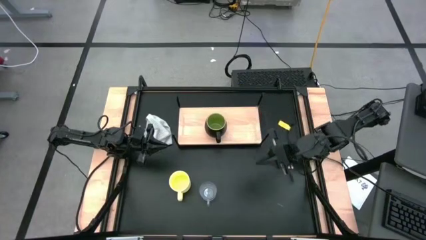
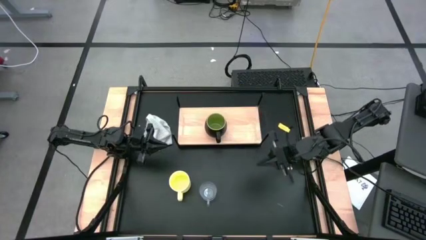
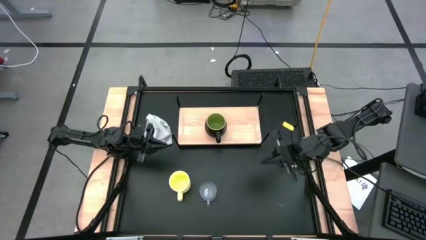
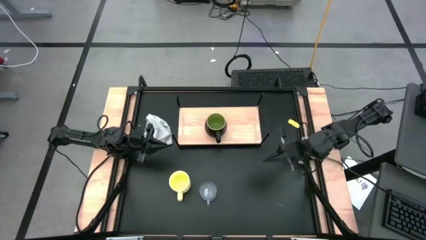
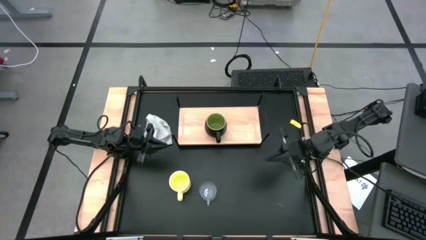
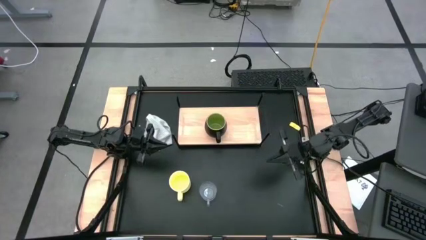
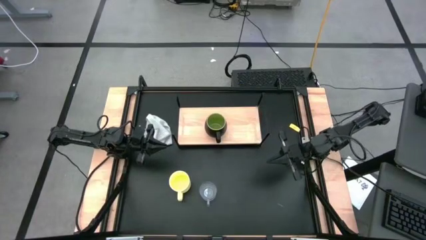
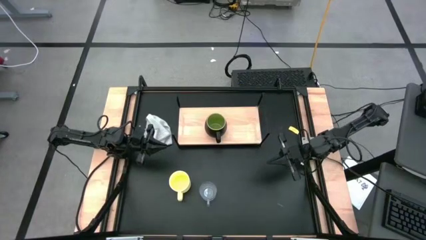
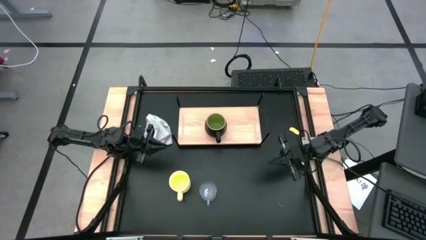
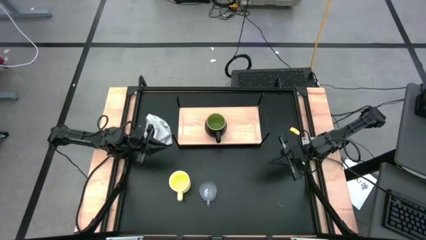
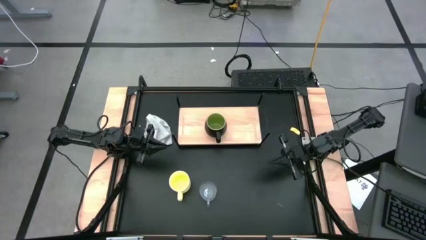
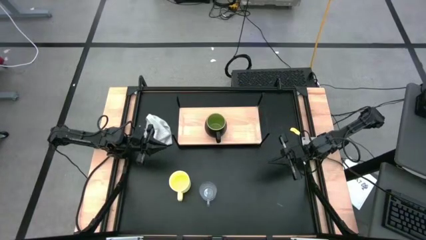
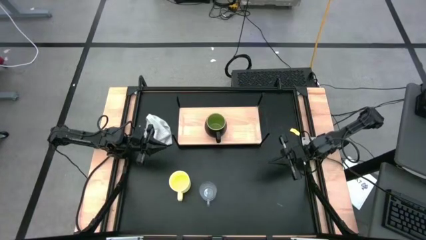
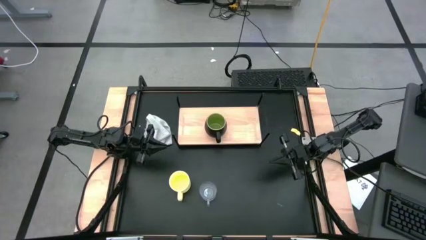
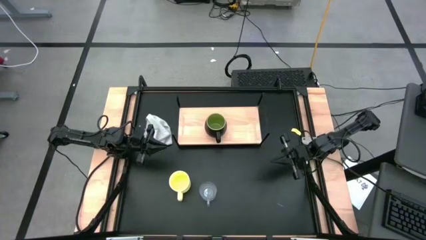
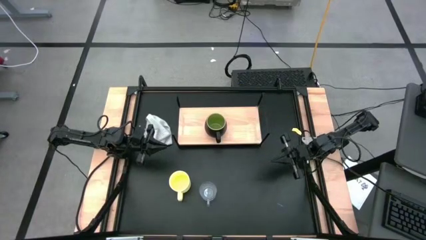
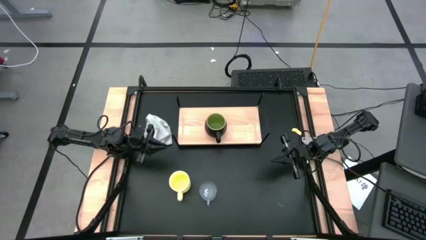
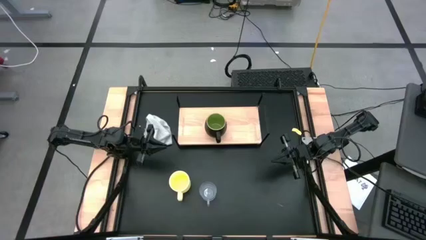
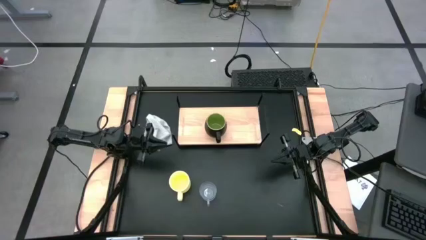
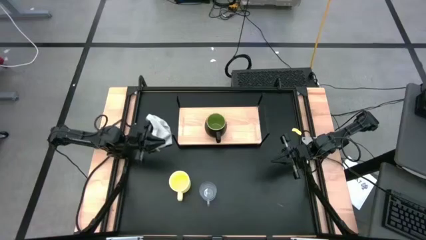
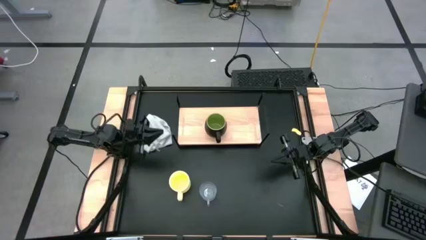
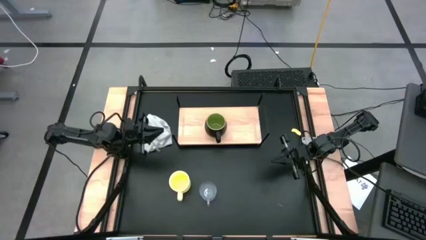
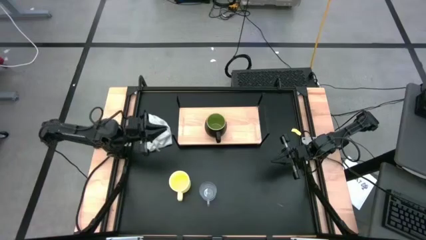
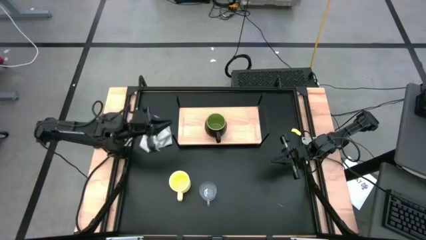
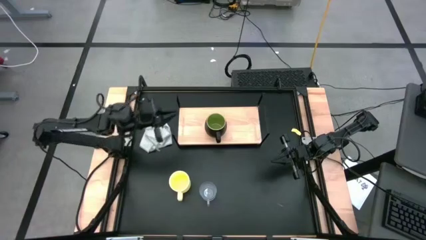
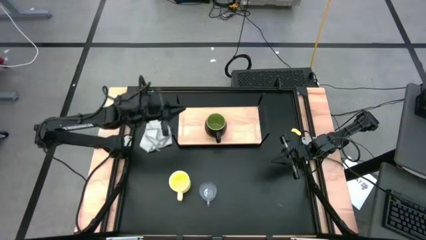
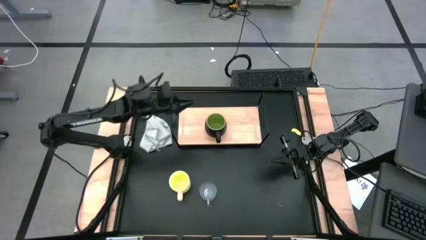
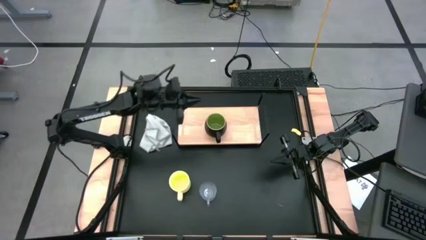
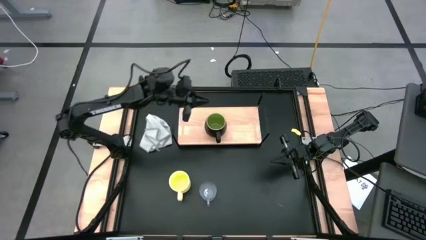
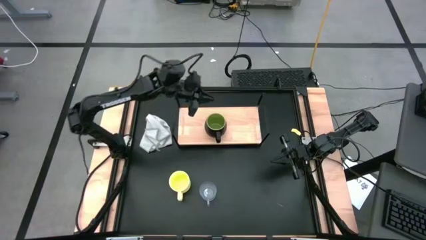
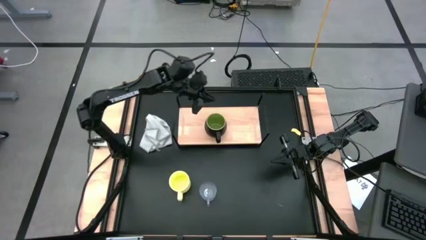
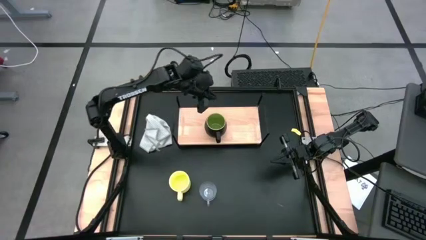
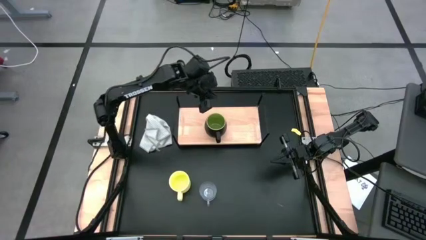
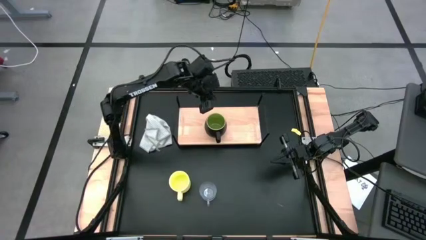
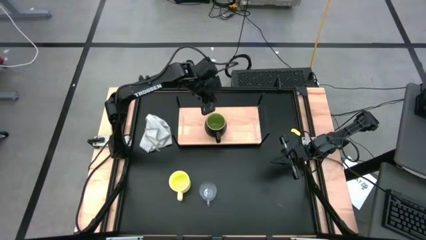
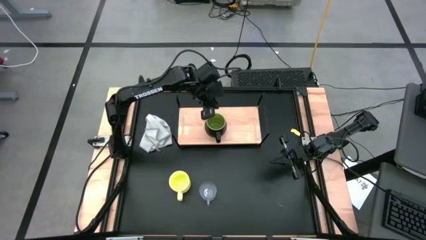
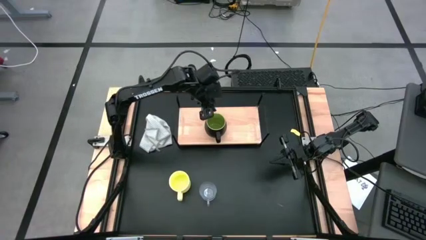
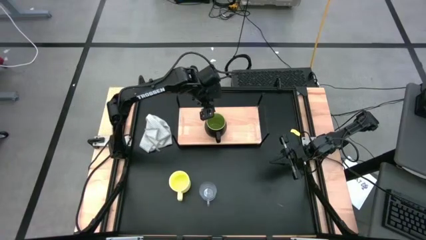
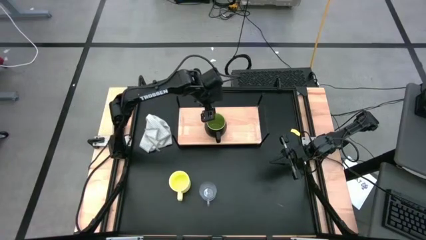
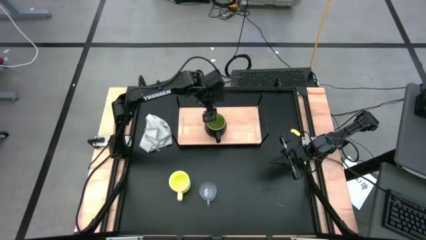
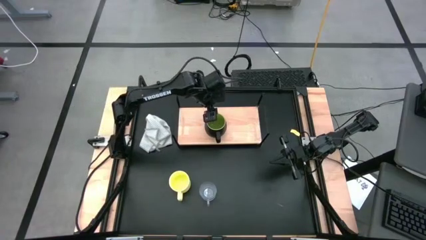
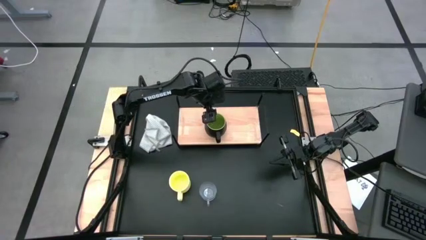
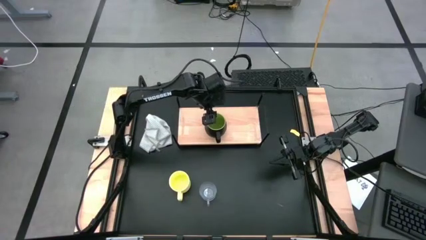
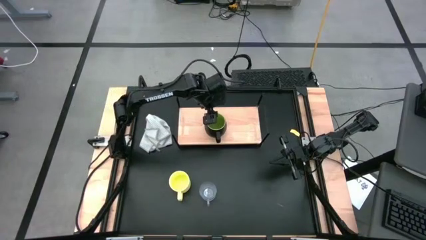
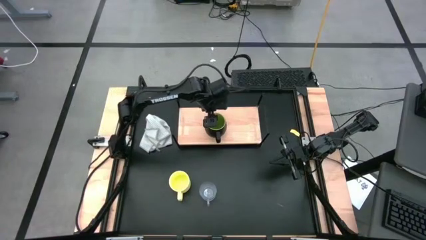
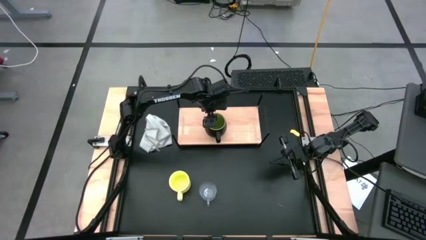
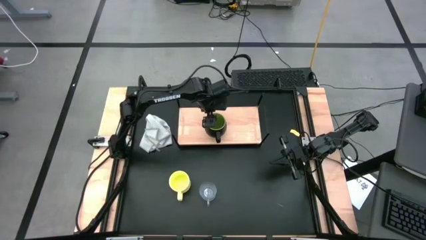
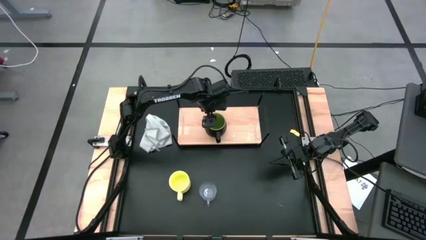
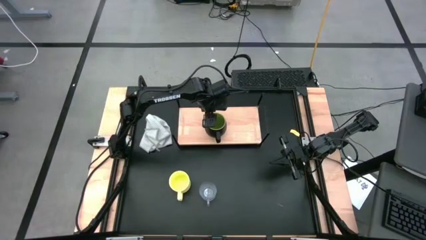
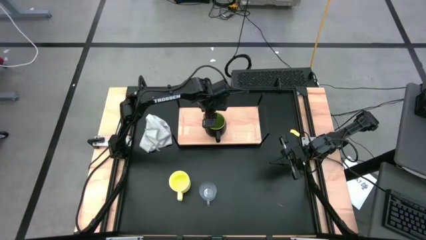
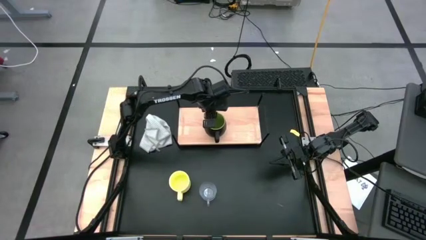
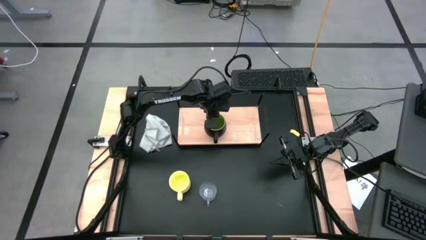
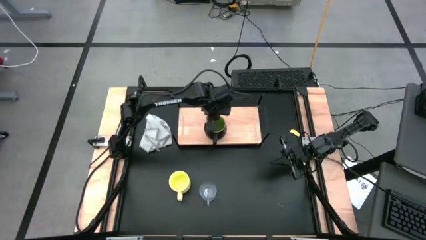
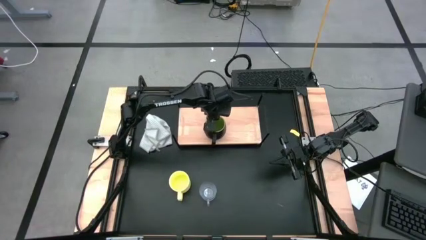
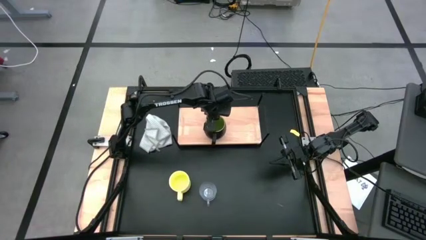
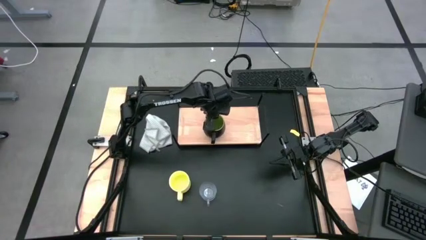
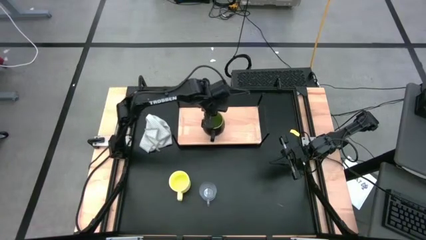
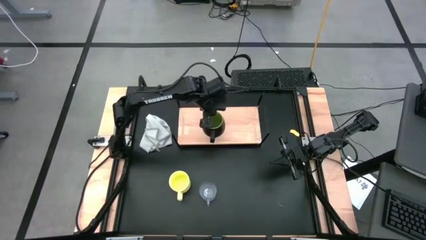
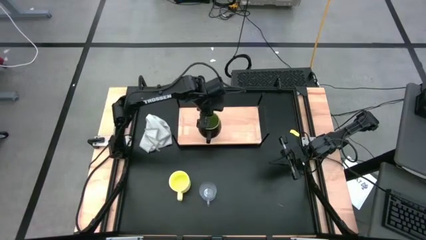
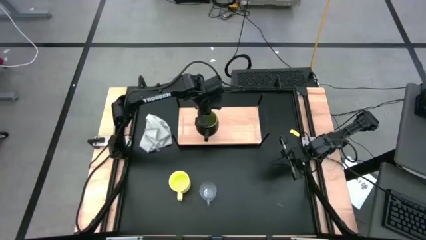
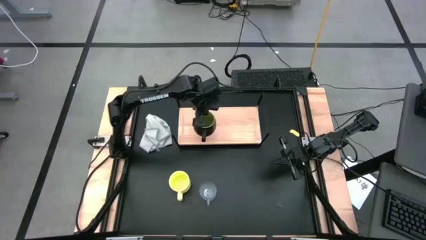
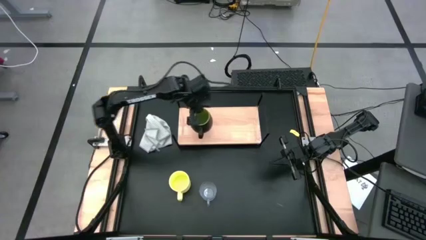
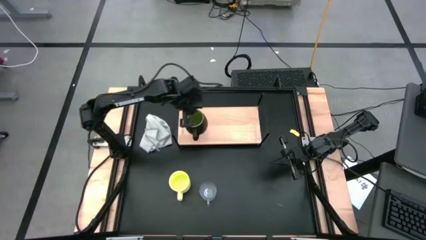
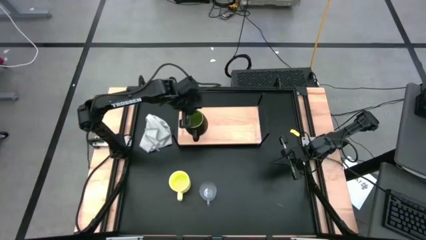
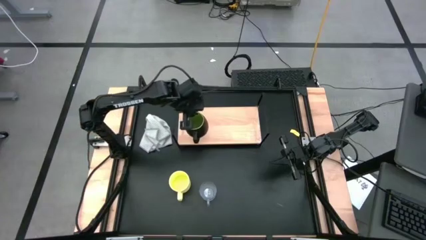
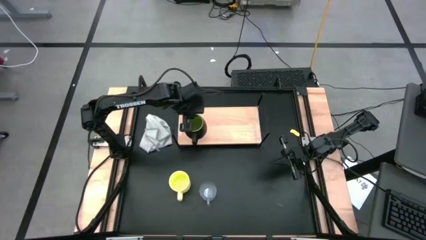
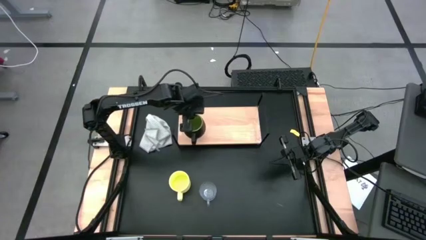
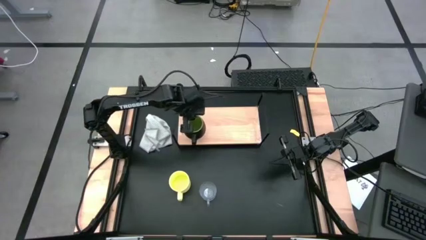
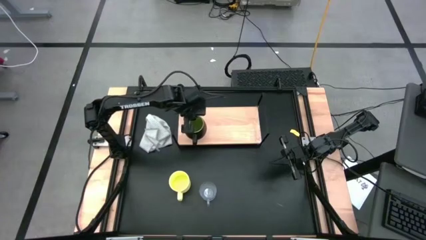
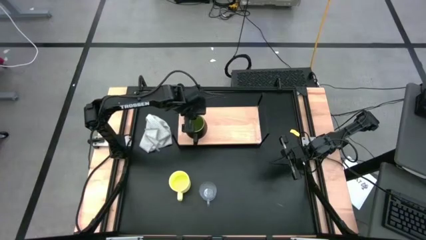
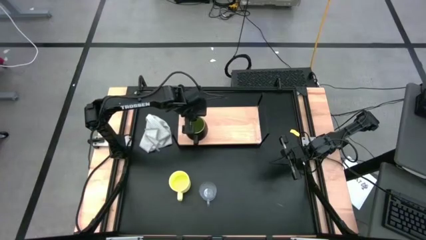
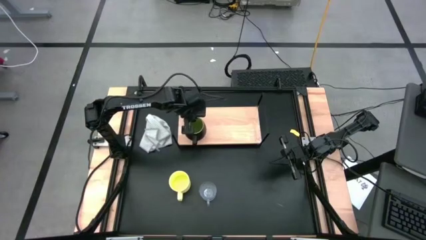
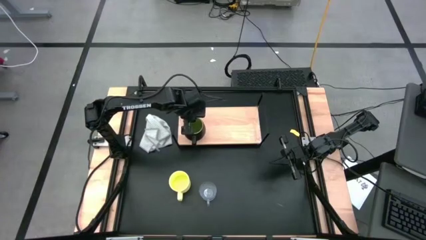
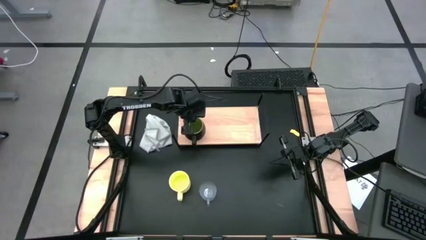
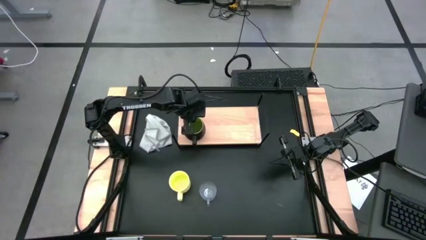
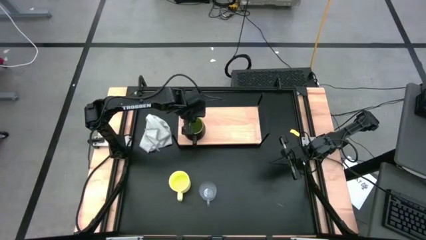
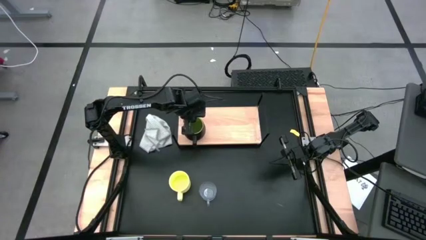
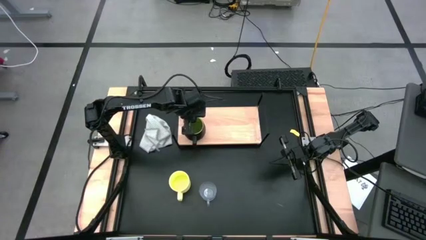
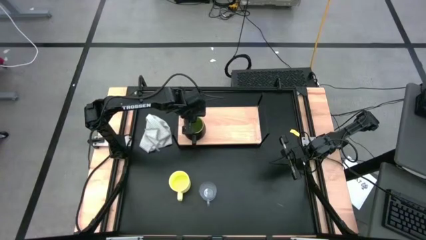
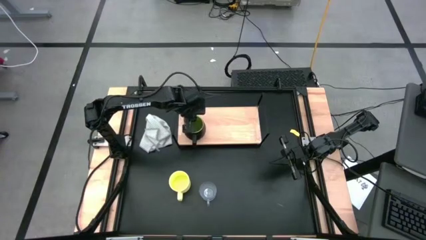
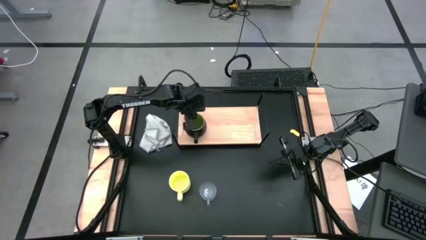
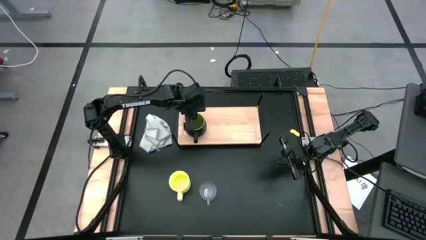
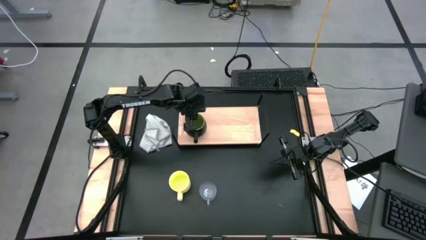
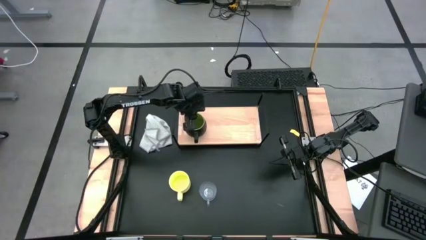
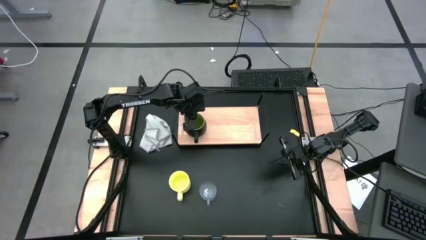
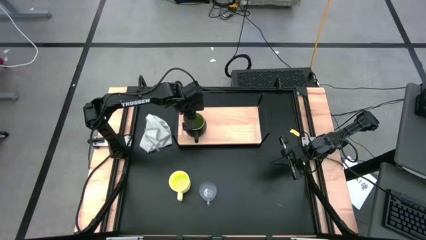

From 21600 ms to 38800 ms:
Task: Stack small to large cups/mugs on shelf
Put the black mug on the shelf
